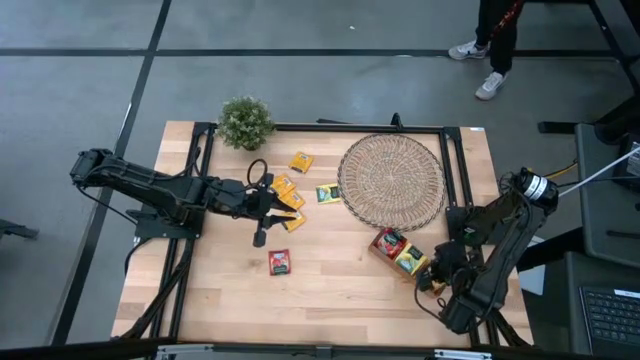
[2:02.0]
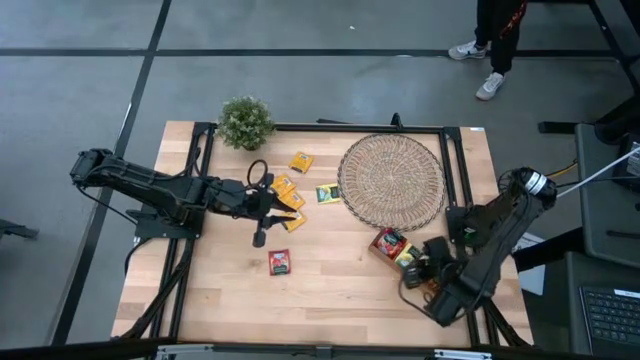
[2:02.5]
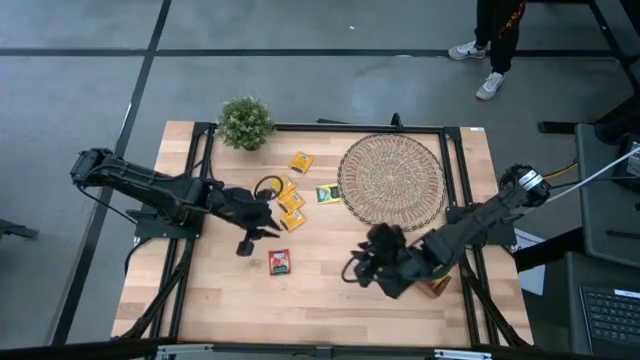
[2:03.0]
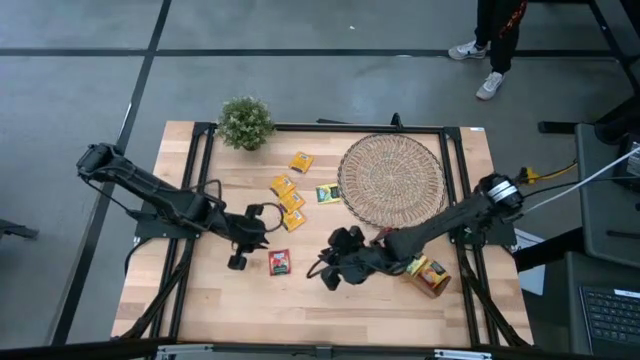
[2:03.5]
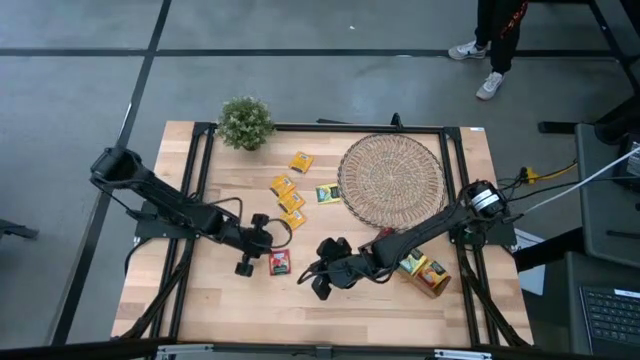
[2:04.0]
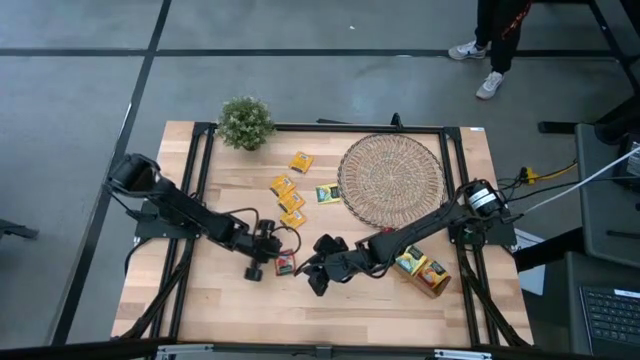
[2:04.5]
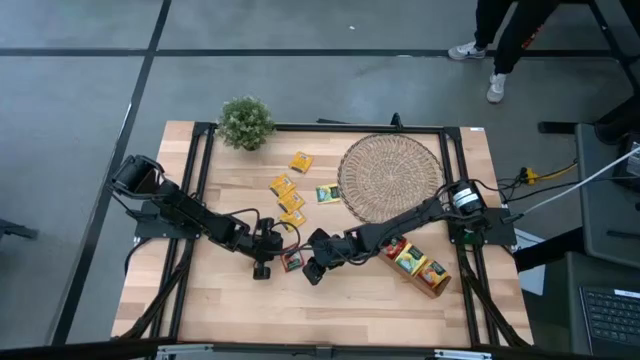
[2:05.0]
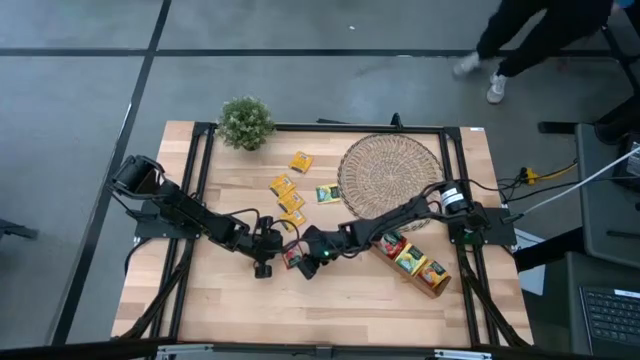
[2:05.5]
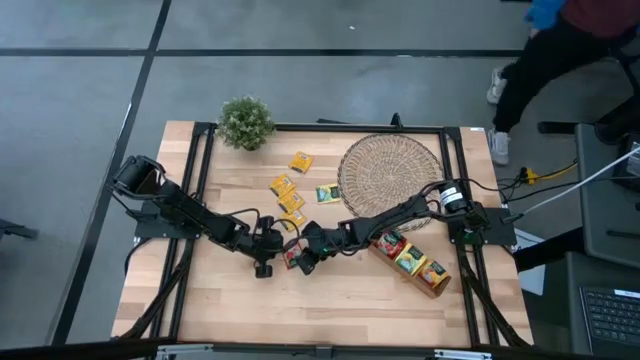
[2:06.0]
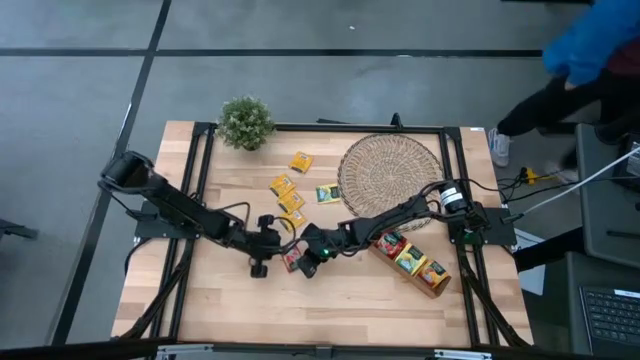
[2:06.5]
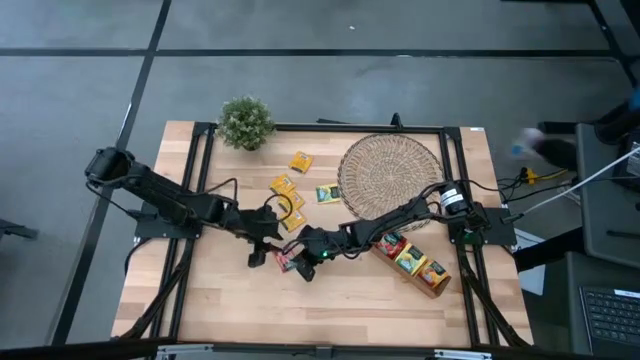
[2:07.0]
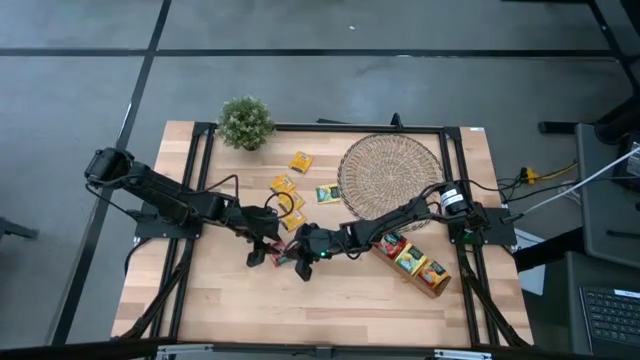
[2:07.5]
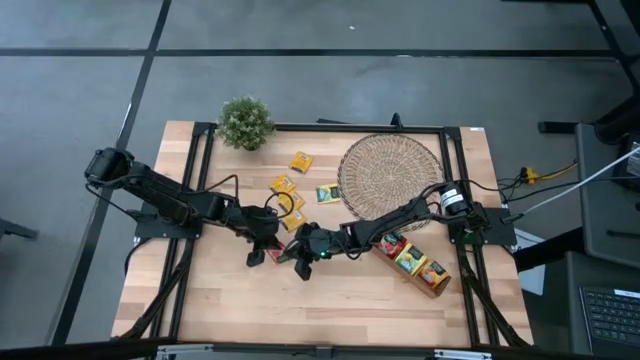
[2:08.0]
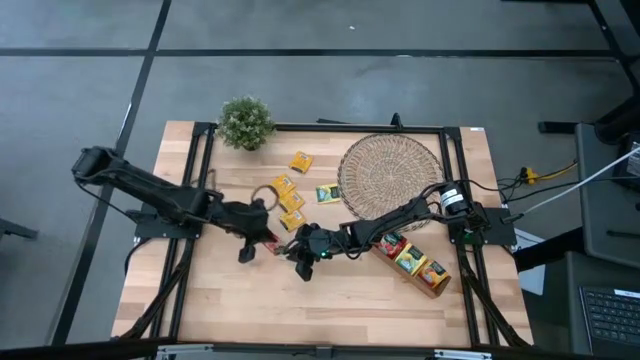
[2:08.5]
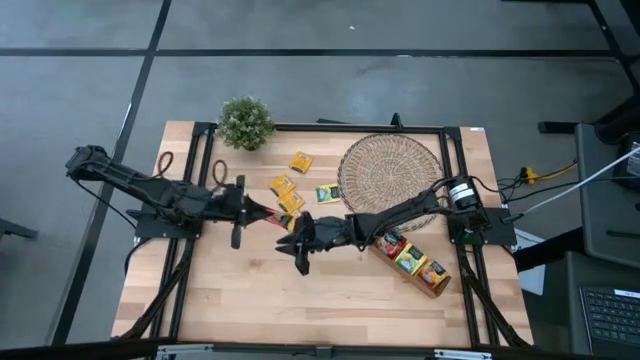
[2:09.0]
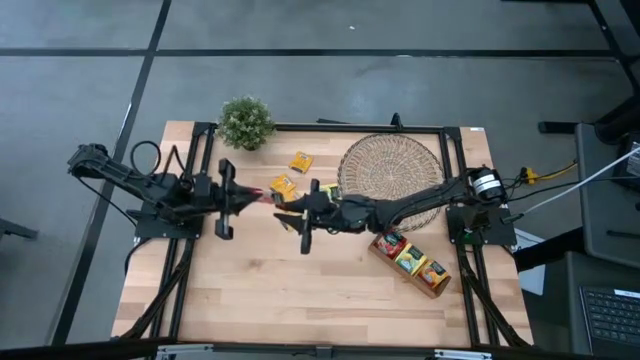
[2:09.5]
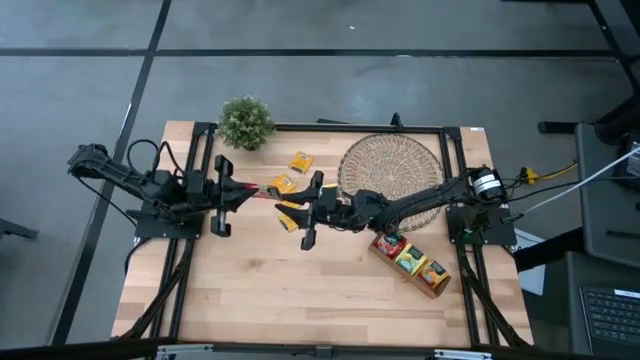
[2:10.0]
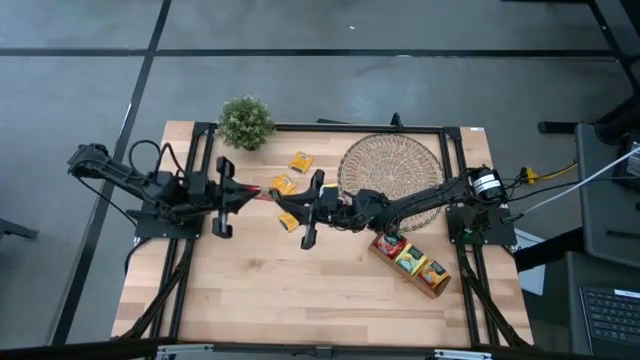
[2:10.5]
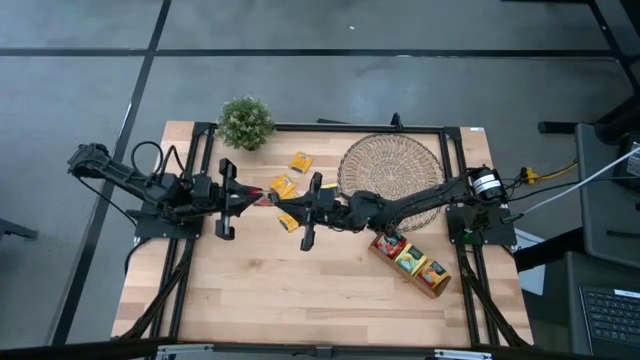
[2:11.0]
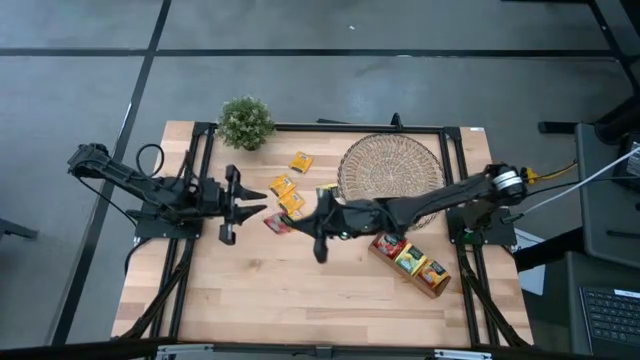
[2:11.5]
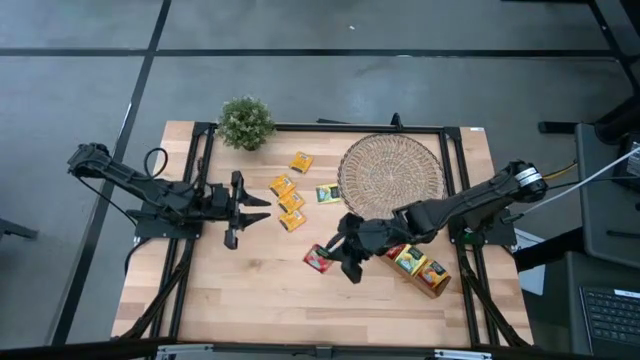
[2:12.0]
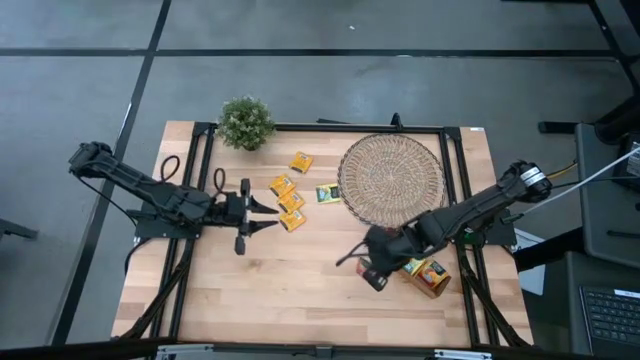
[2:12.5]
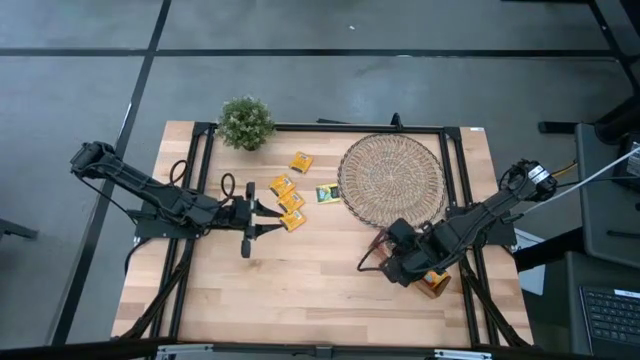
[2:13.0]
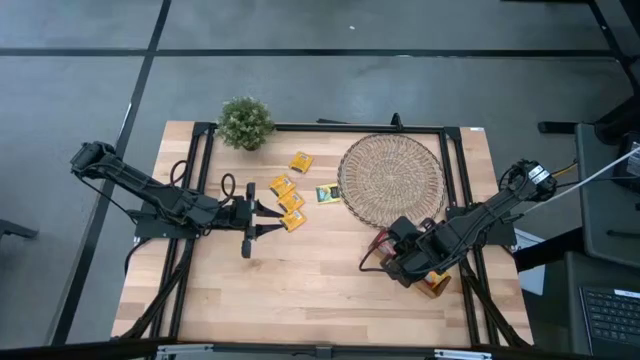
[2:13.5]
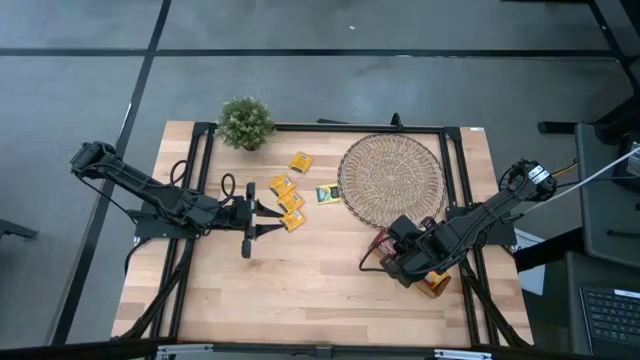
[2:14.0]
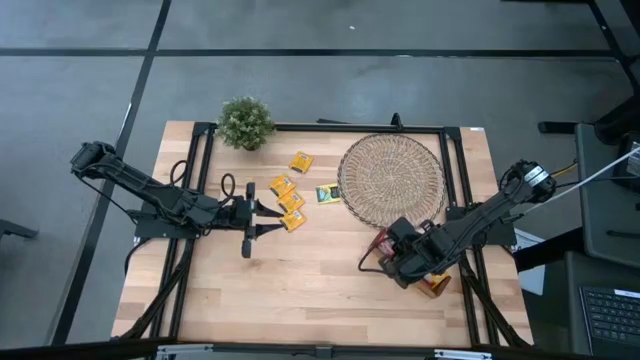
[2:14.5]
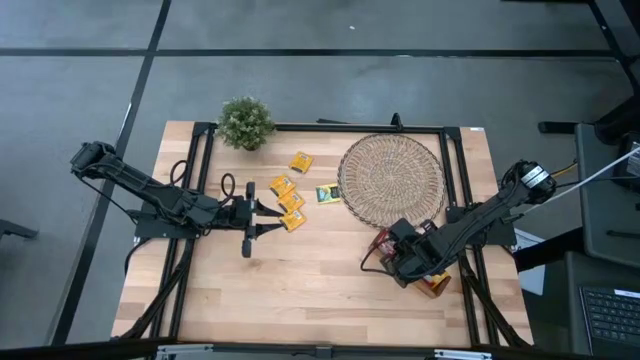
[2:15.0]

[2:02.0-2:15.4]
Task: Pick & Place Tea
Put the red tea bag into the left slot of the wooden organizer

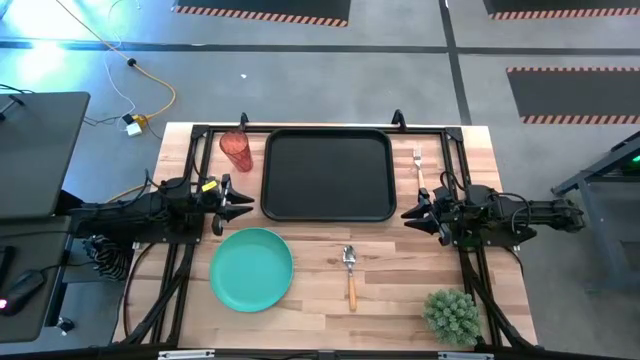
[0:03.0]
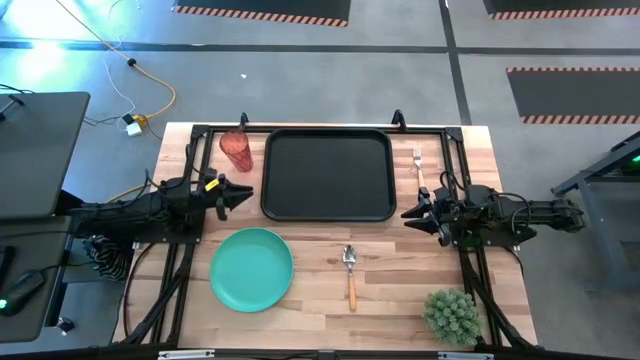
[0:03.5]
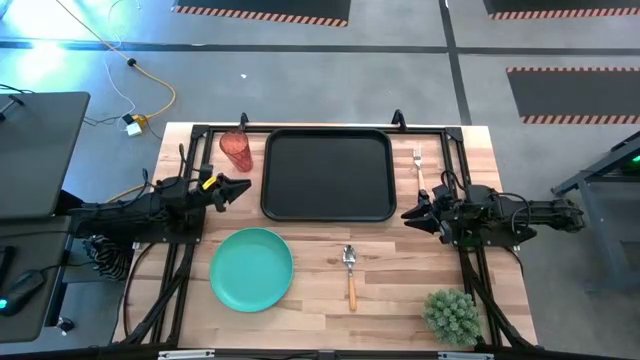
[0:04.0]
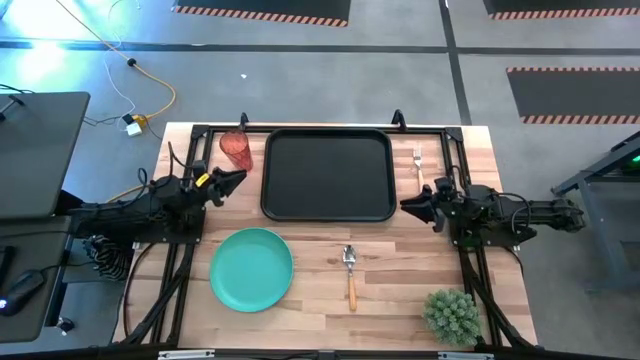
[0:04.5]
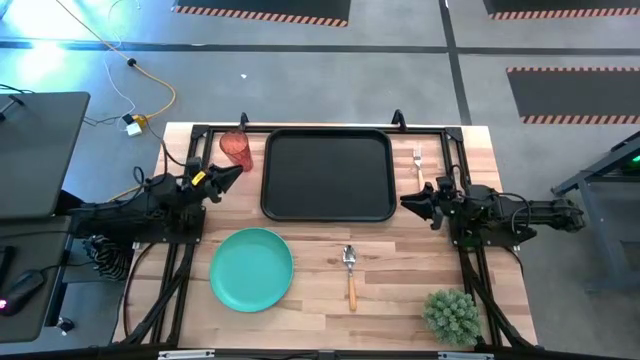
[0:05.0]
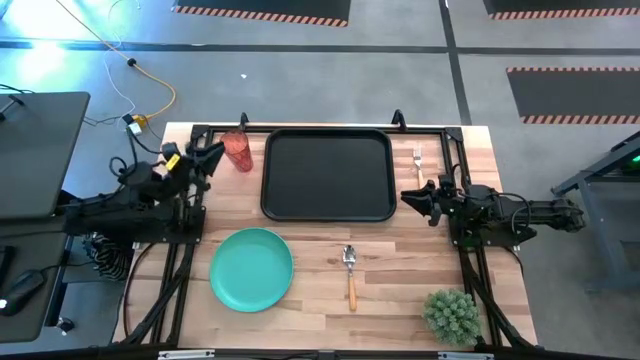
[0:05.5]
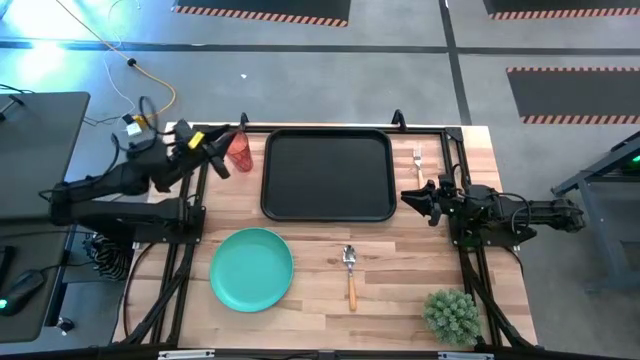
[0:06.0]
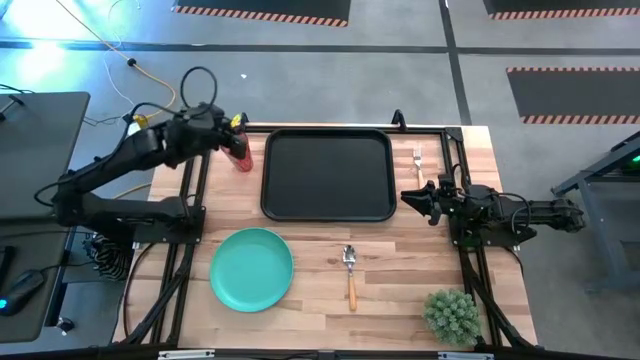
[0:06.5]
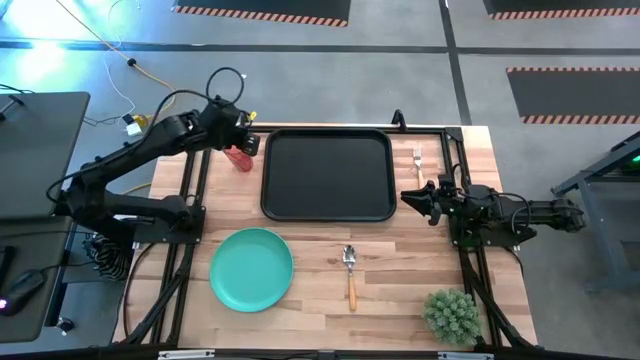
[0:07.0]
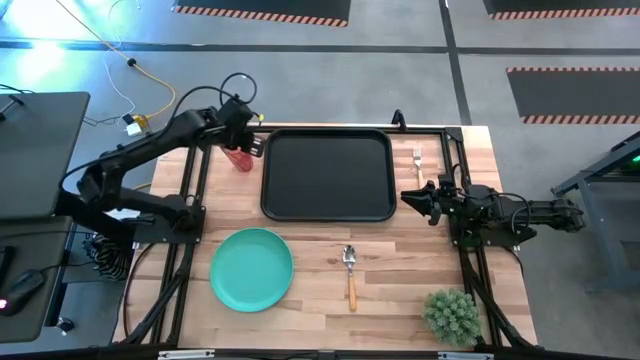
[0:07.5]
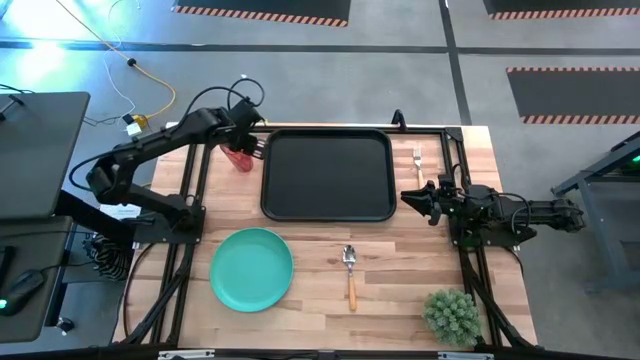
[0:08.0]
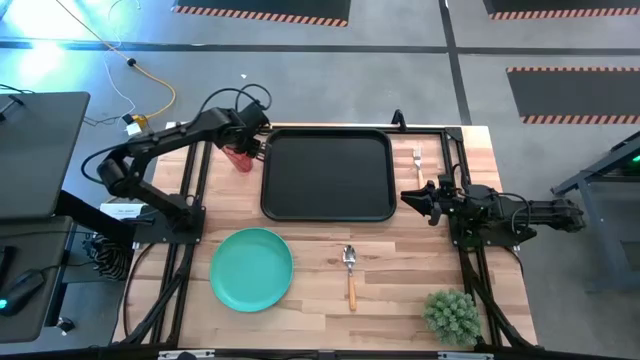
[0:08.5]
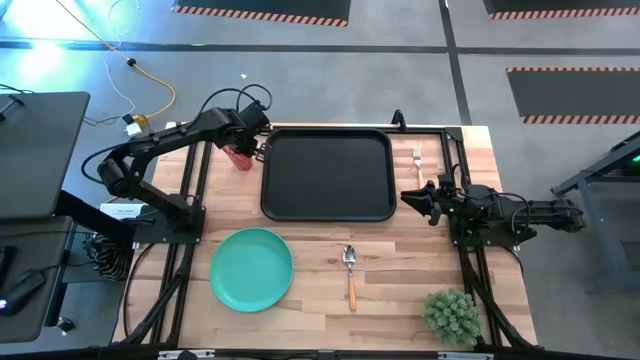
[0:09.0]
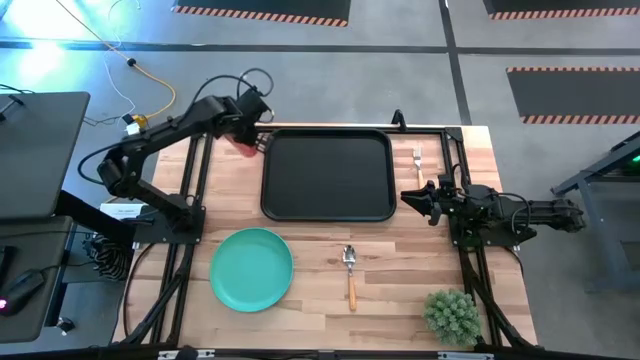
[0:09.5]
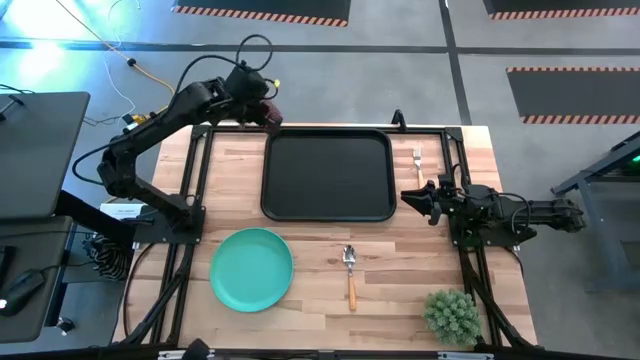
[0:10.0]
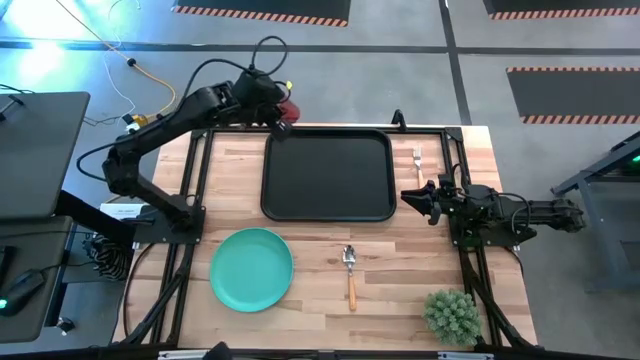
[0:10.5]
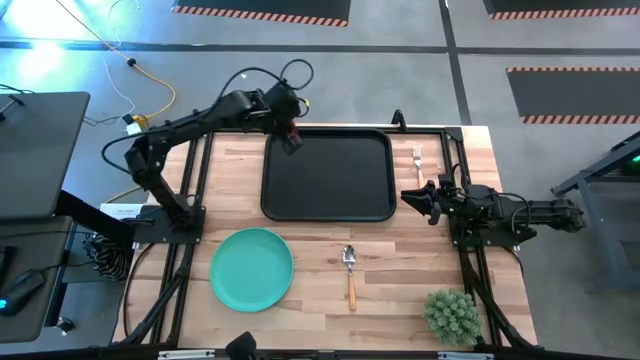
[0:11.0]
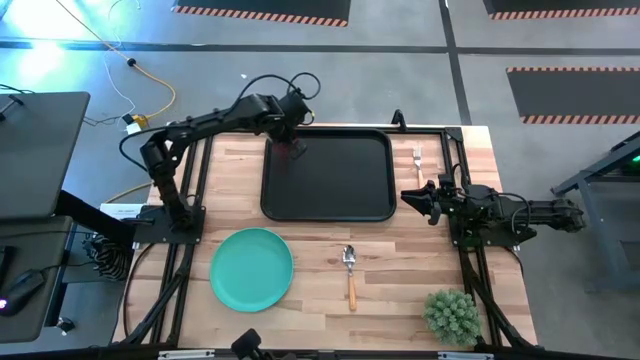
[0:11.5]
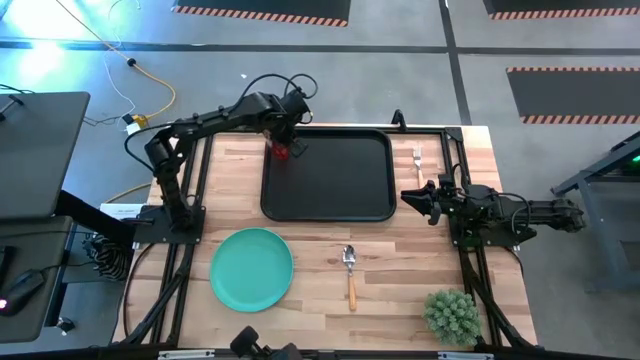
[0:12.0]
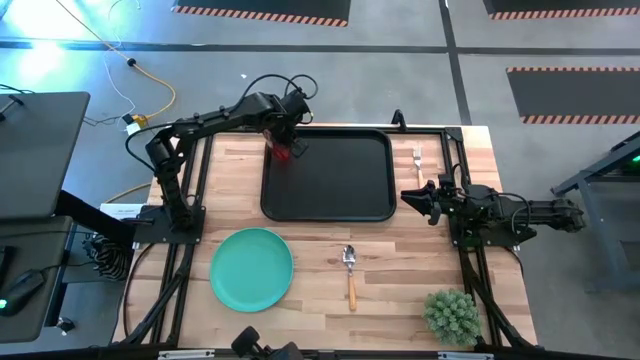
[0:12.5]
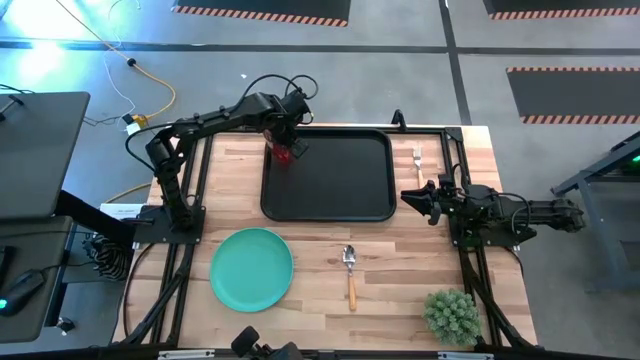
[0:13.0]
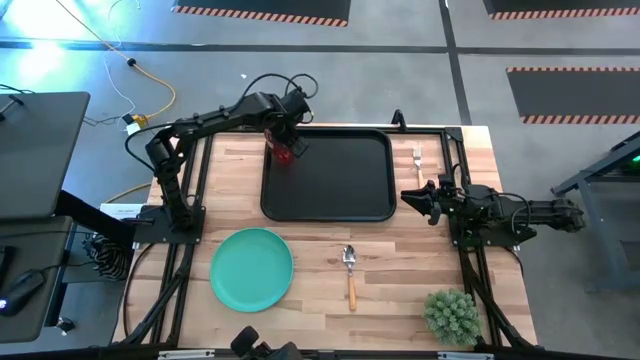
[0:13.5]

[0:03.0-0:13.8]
Task: Pick and place plate/cup/fork/spoon on tray
Put the orange cup on the top left of the black tray
